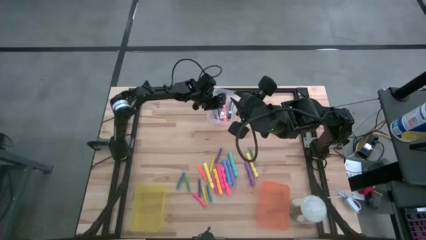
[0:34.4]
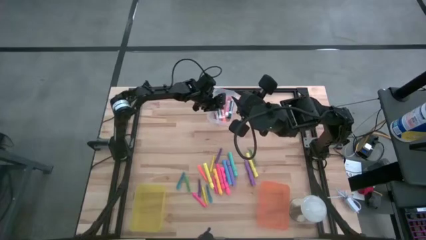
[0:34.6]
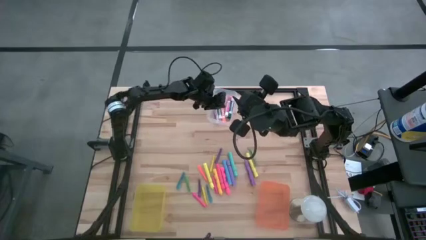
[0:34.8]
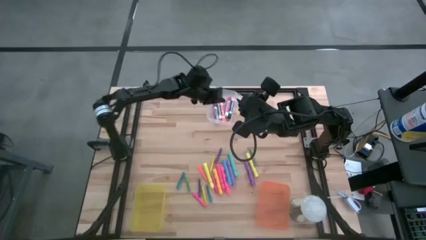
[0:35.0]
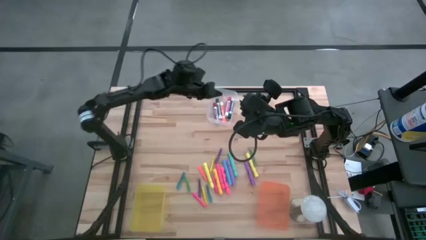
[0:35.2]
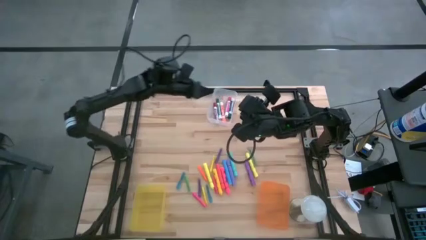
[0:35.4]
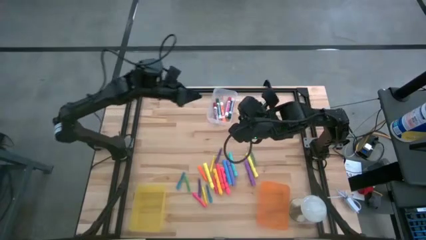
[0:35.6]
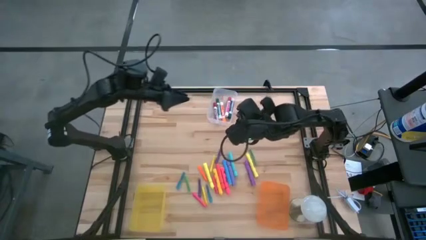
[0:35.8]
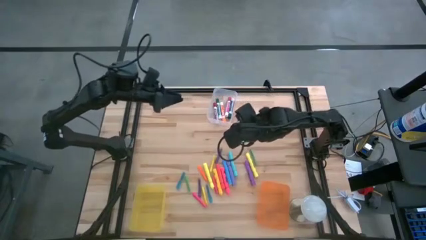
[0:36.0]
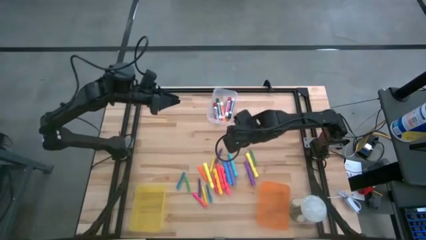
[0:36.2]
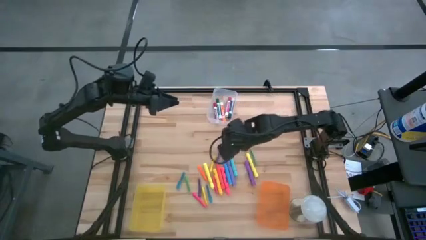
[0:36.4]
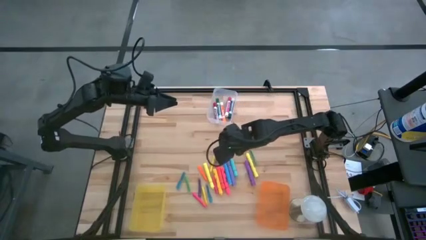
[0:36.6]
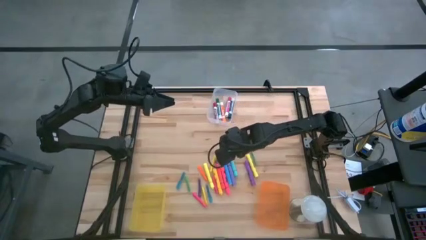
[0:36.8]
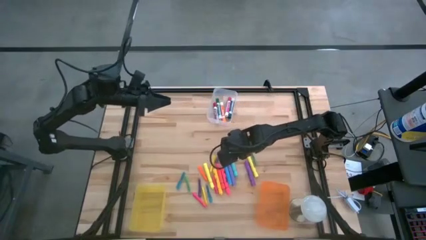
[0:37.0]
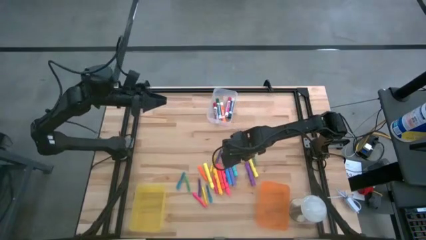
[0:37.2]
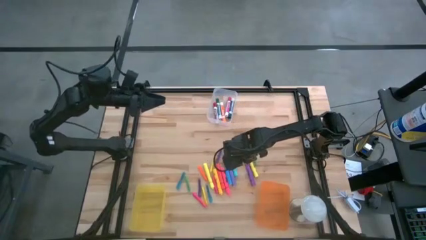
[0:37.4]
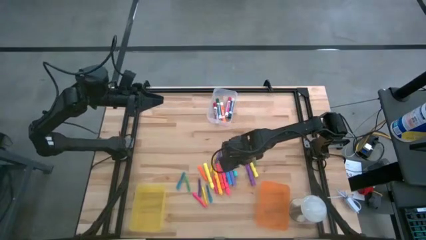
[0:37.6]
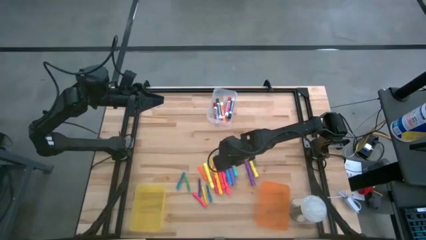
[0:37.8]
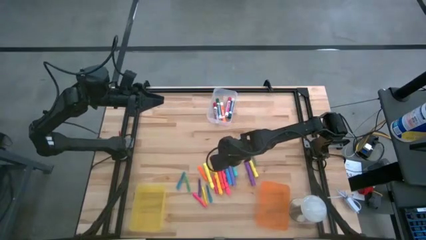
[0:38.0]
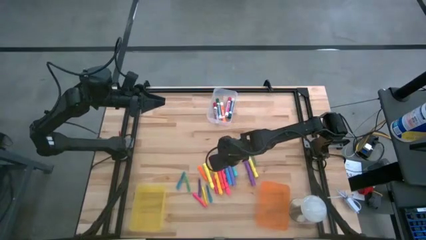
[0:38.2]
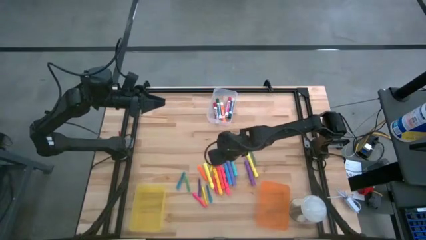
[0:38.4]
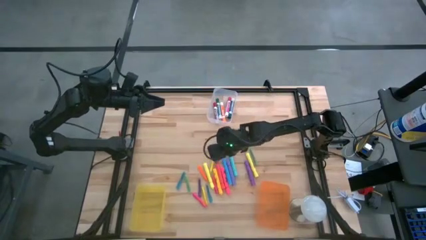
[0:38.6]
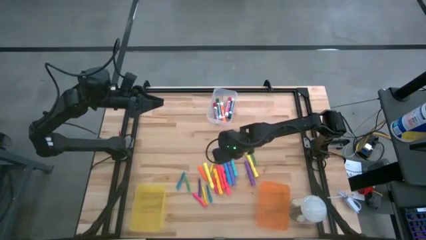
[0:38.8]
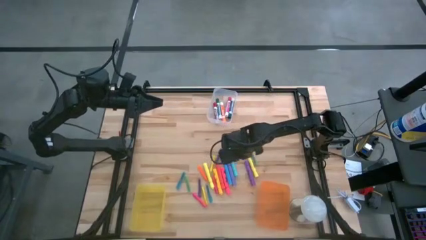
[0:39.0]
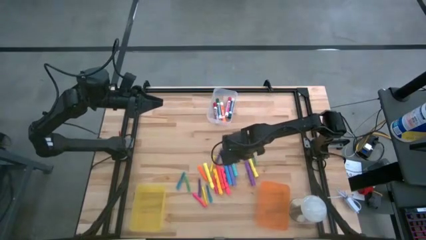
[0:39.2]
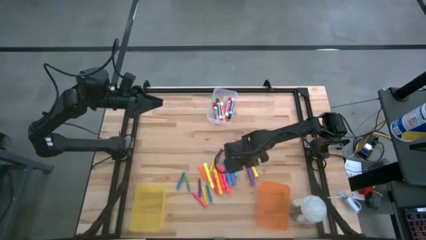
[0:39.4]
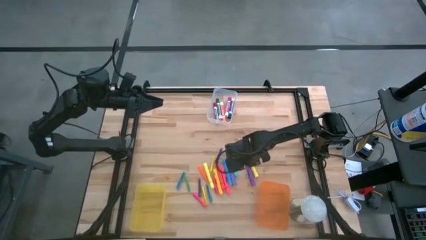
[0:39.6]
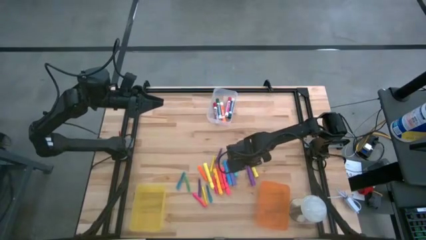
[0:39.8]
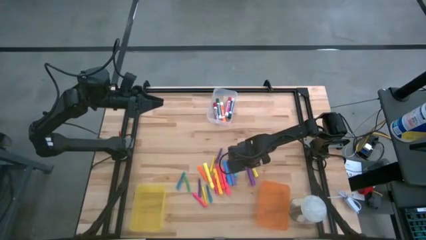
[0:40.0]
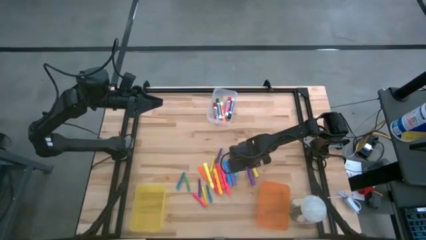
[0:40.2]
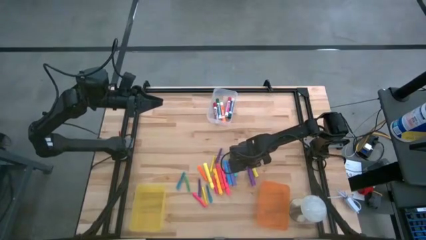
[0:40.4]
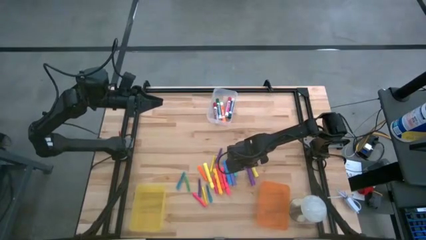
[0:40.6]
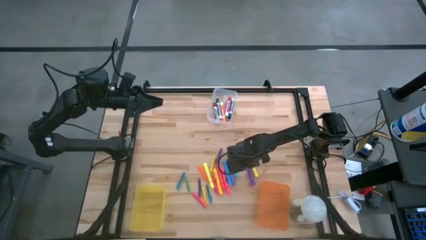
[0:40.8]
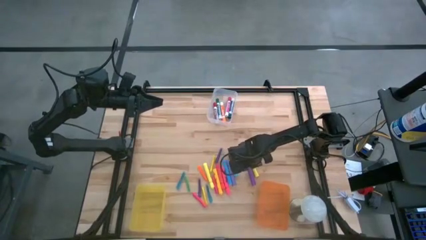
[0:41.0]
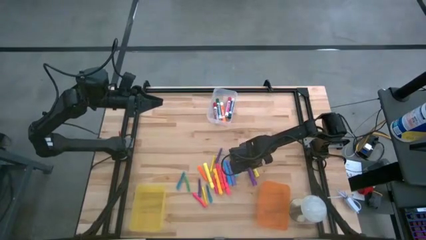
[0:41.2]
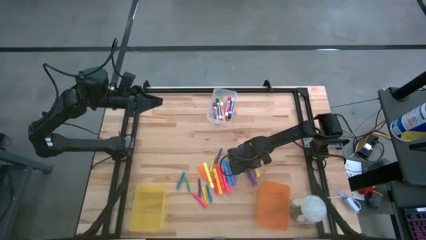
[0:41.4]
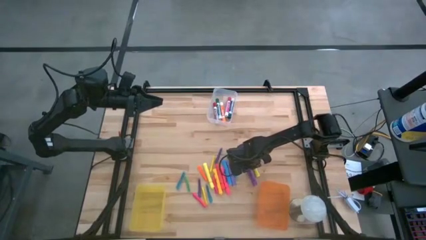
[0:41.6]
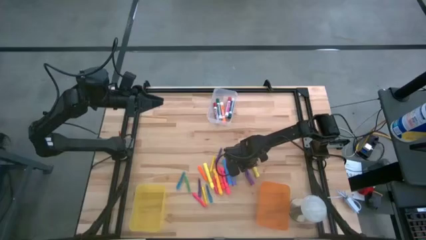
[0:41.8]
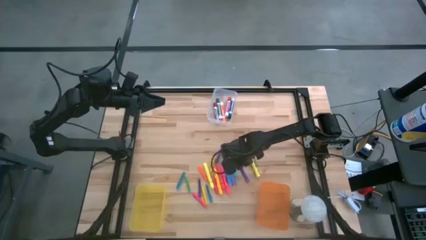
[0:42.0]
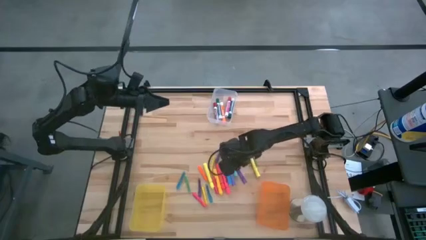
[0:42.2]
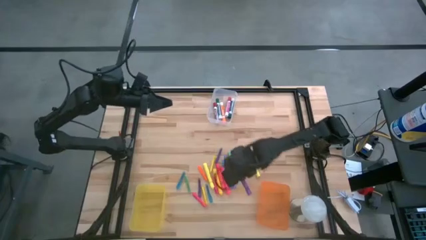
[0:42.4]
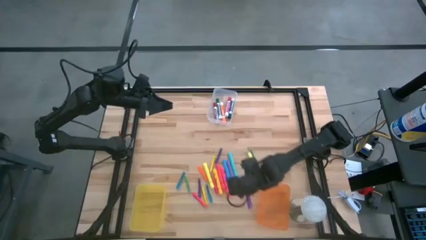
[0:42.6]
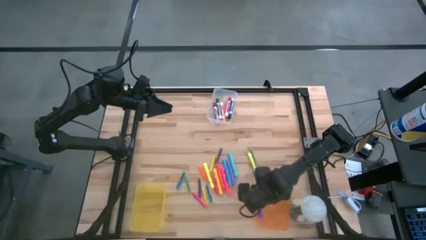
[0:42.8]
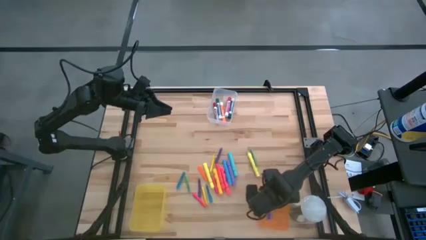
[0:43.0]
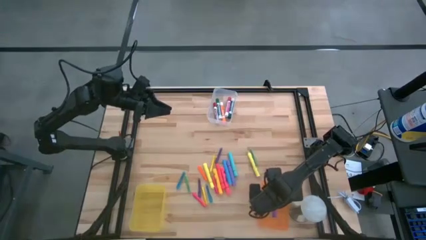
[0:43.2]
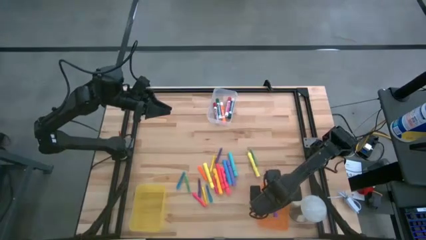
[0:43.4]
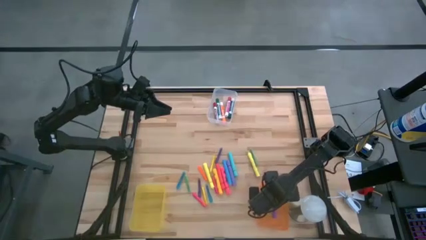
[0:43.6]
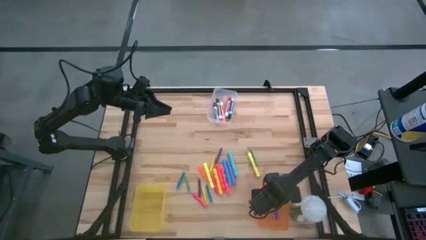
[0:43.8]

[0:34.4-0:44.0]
Task: Pick & Place Markers
Put the violet highlighter into the orange bin

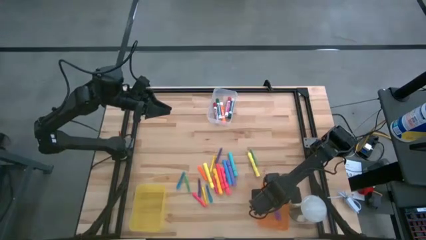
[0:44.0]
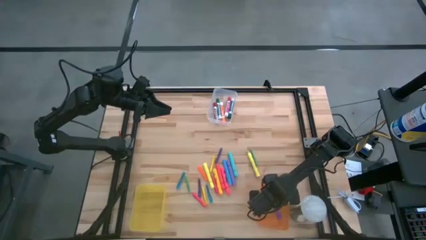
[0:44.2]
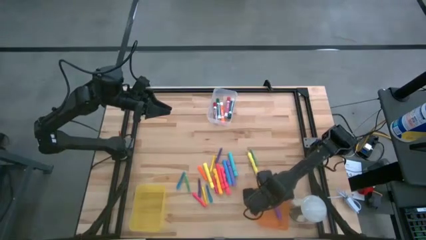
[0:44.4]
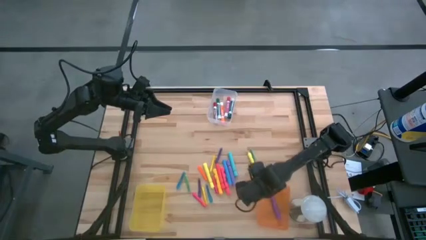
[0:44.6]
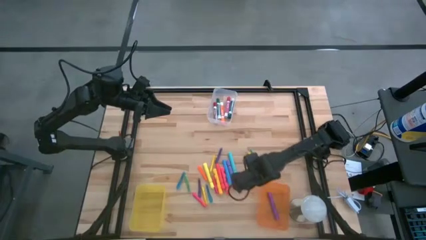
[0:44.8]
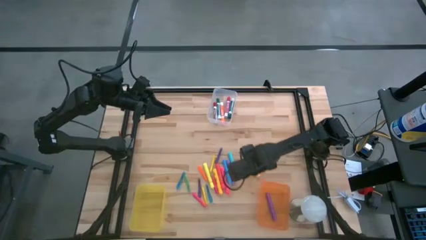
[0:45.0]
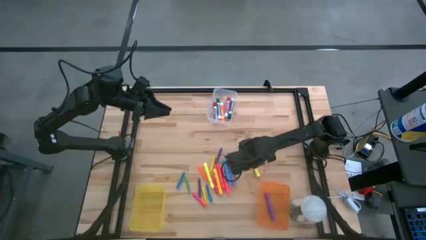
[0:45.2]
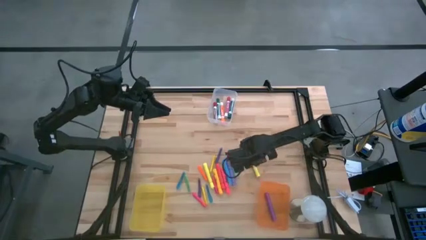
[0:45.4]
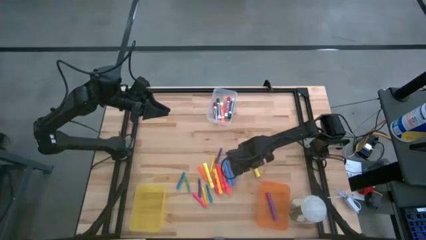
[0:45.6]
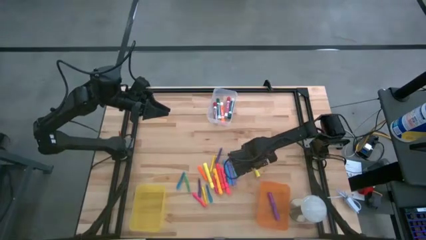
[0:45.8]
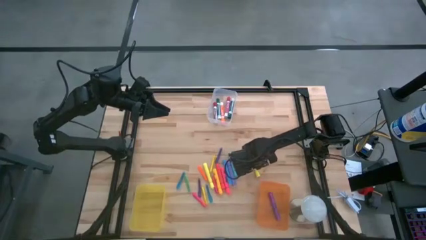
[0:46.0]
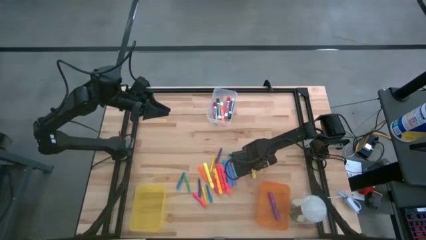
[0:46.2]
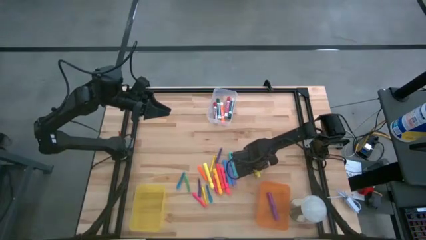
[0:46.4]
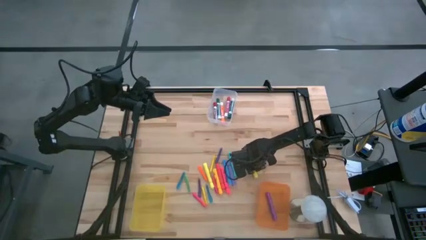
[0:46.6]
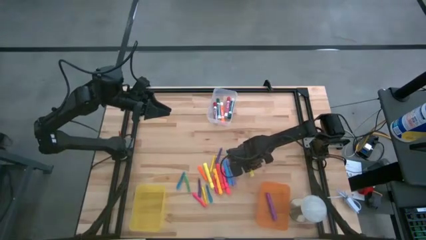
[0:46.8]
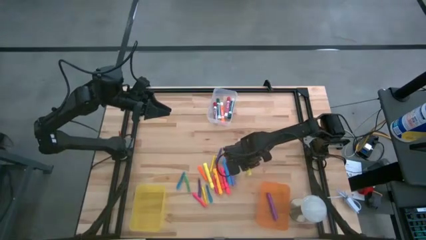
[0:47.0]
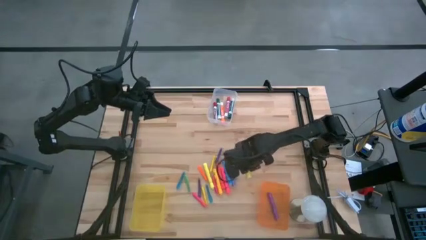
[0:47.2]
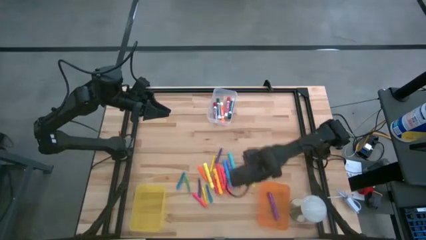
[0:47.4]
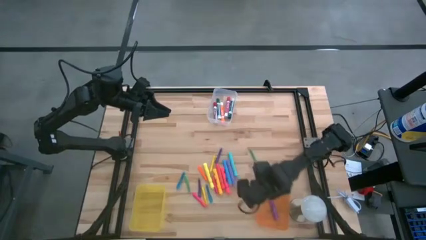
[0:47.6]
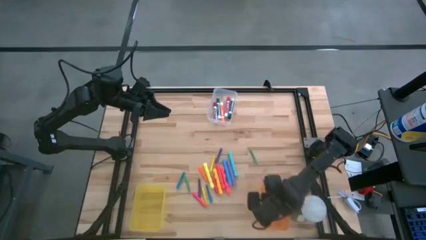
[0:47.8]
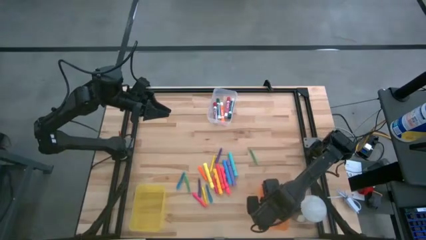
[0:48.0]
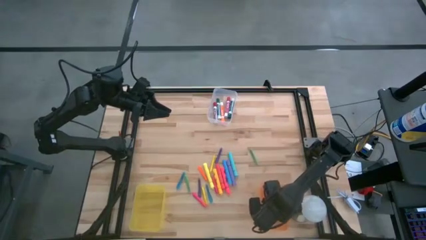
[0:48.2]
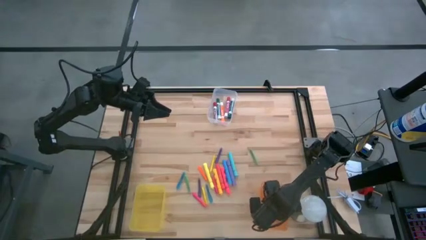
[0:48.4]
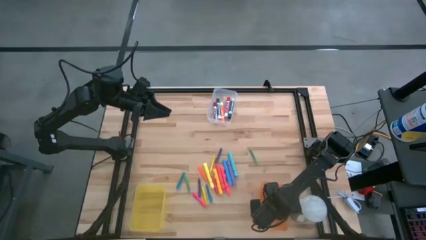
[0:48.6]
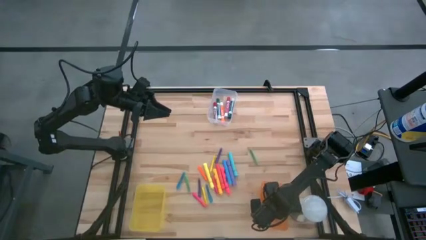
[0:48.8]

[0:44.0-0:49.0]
Put the yellow highlighter into the orange bin

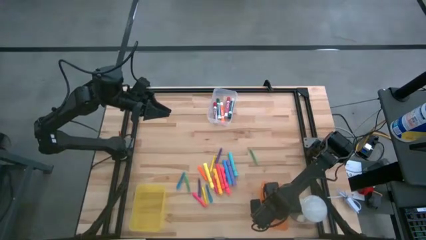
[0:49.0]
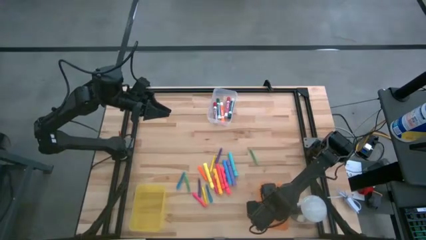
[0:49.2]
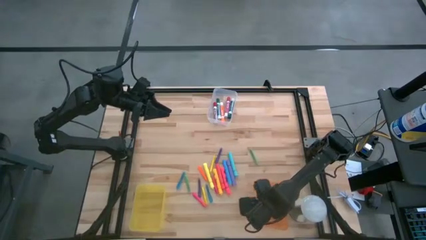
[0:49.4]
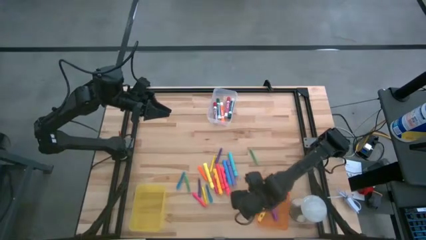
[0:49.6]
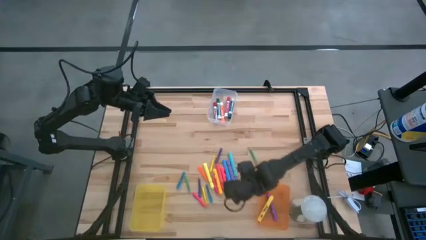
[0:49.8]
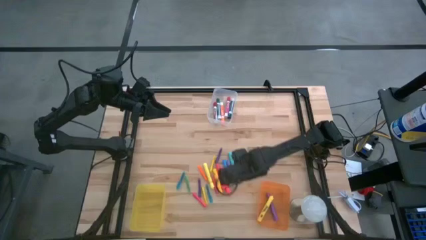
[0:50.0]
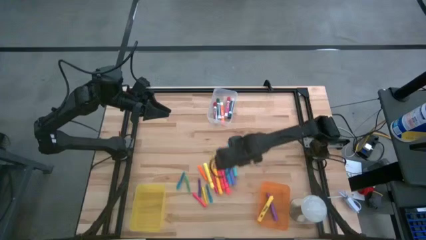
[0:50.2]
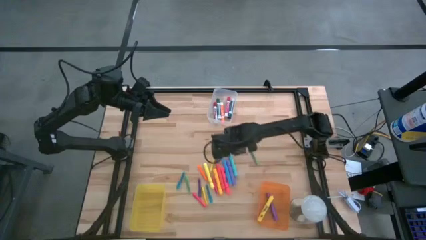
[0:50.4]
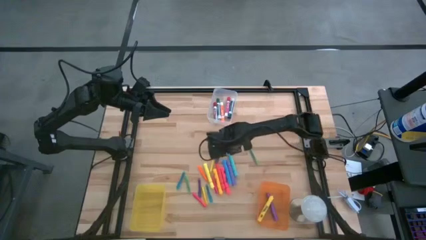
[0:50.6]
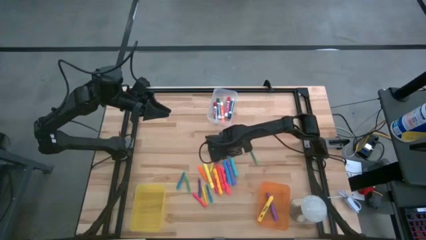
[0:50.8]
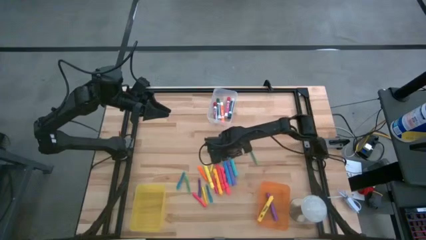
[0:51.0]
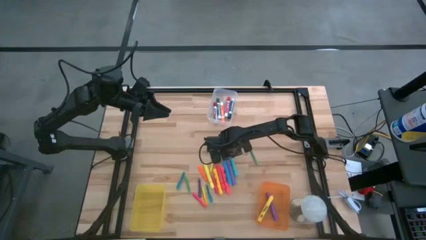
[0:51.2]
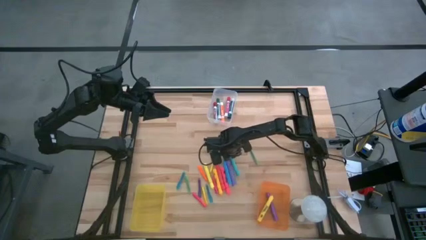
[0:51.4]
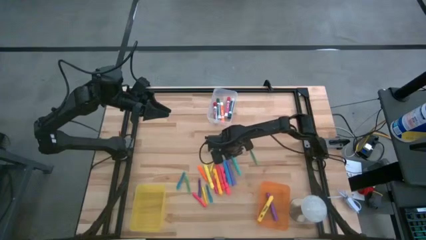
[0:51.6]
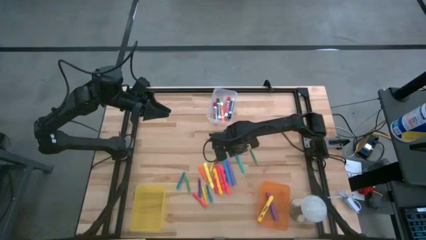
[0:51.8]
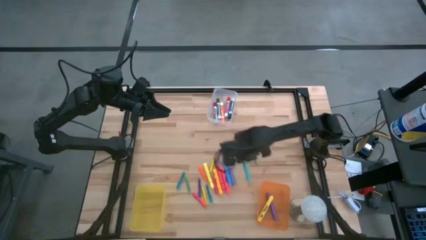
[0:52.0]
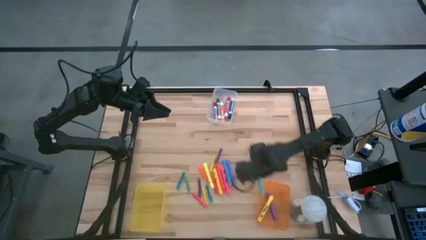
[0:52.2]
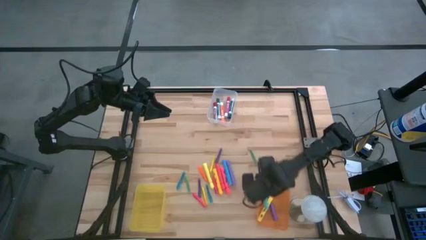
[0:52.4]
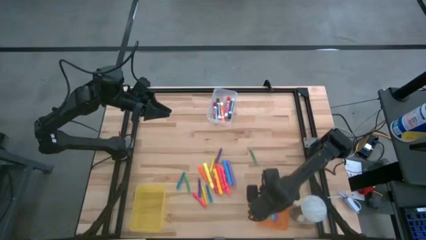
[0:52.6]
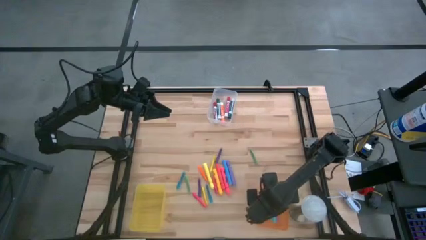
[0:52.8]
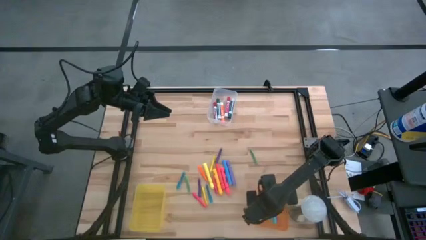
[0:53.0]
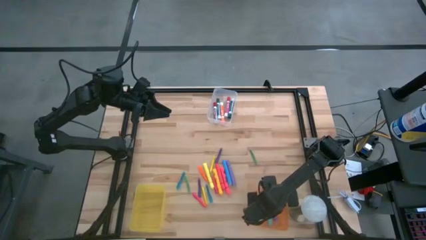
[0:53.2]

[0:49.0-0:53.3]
Put the light blue highlighter into the orange bin
